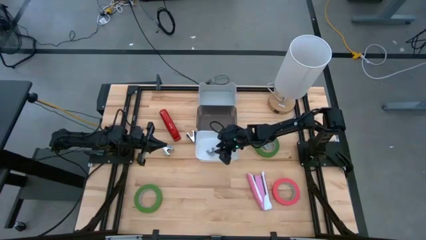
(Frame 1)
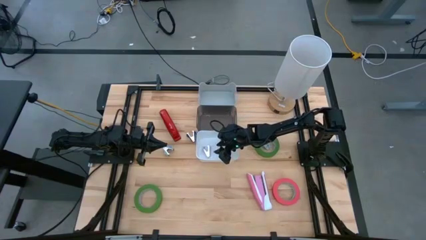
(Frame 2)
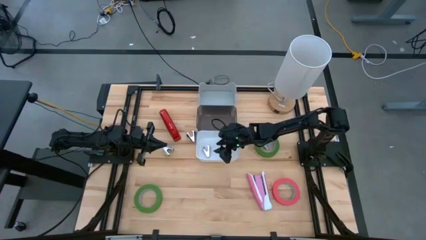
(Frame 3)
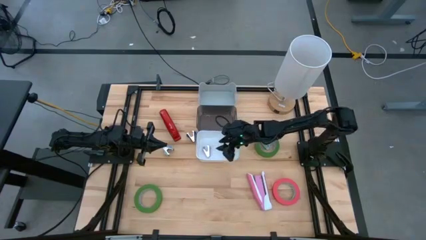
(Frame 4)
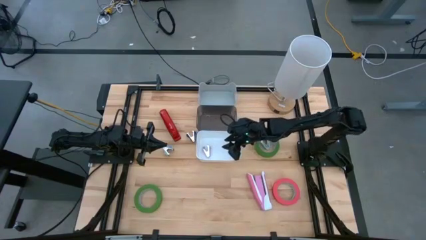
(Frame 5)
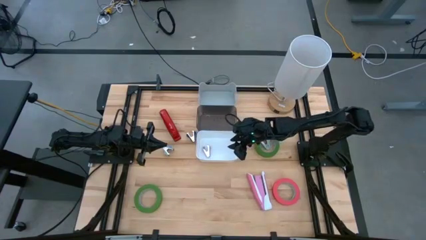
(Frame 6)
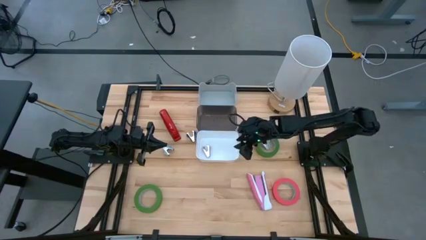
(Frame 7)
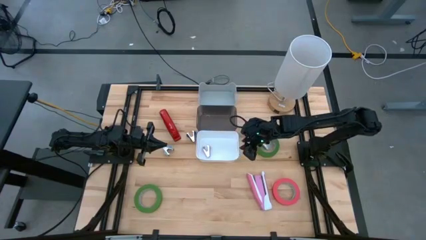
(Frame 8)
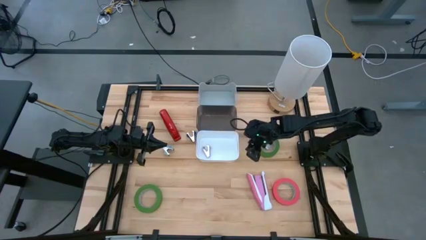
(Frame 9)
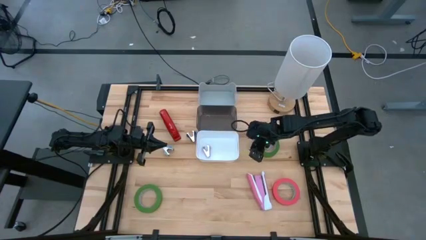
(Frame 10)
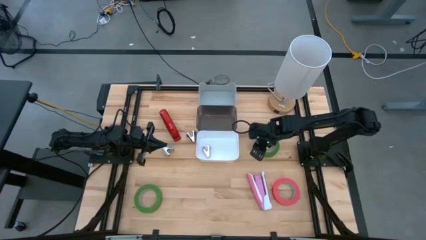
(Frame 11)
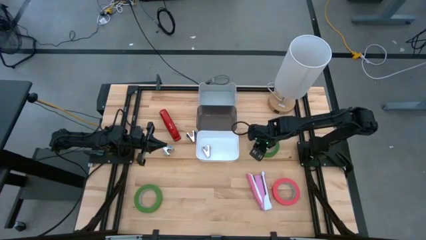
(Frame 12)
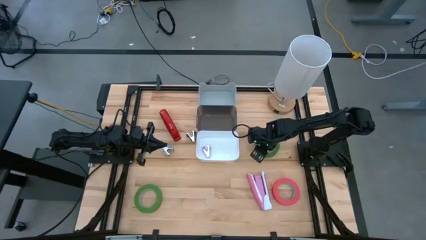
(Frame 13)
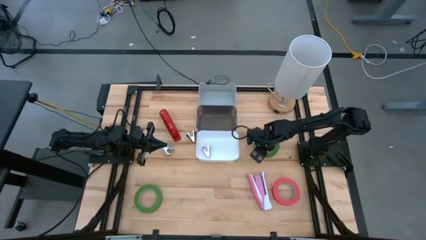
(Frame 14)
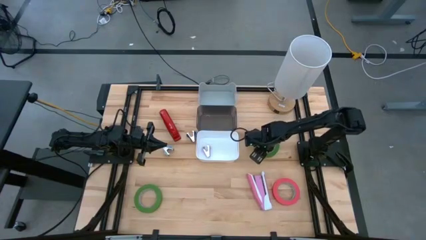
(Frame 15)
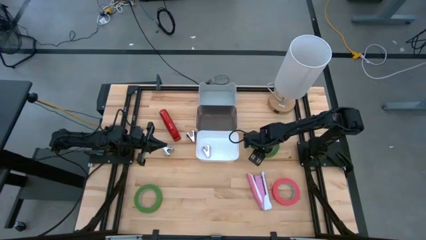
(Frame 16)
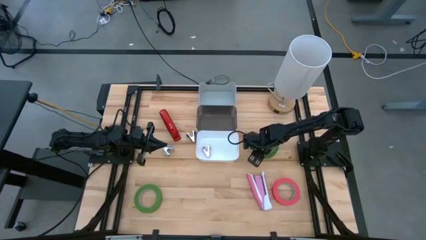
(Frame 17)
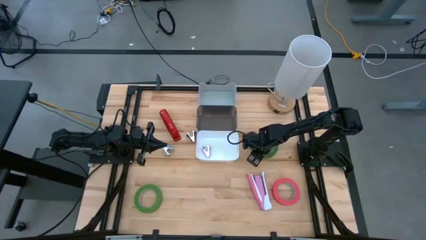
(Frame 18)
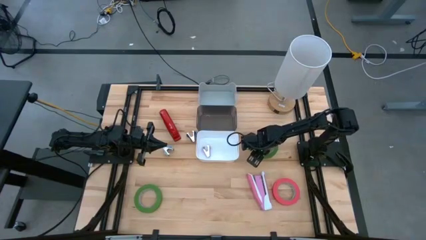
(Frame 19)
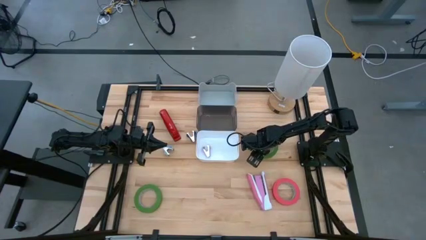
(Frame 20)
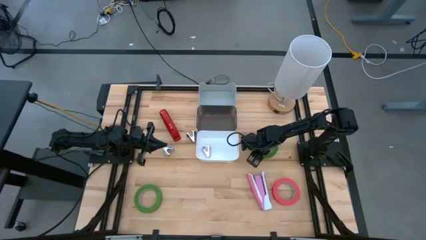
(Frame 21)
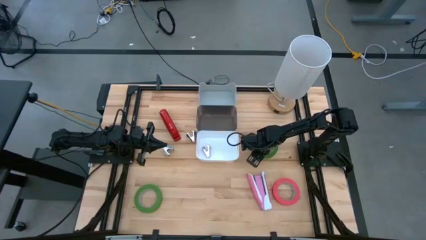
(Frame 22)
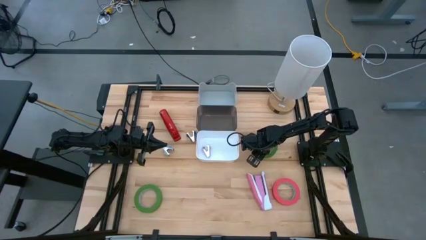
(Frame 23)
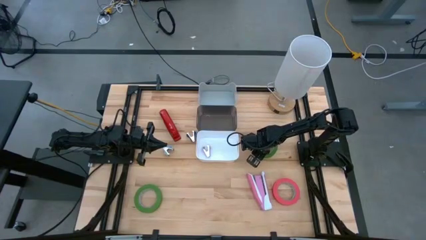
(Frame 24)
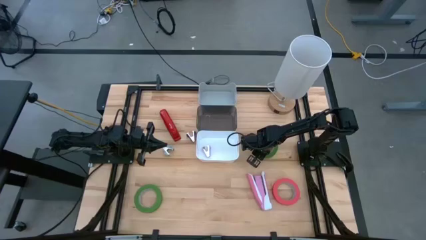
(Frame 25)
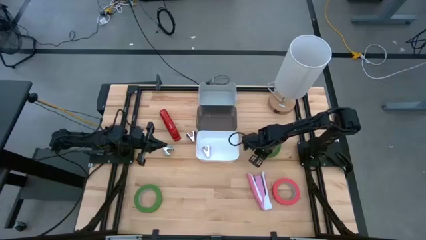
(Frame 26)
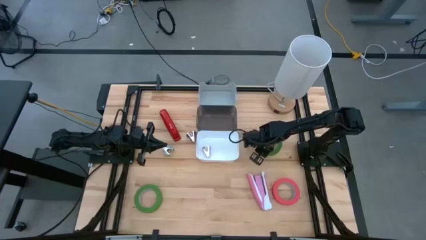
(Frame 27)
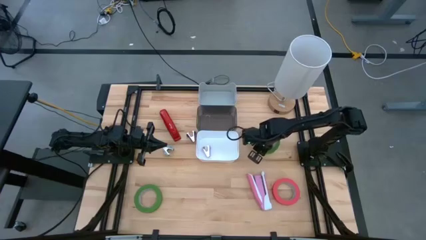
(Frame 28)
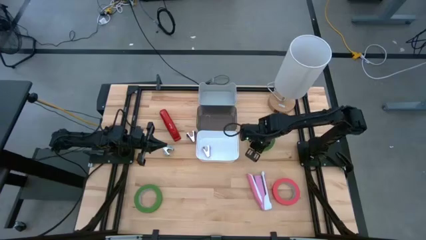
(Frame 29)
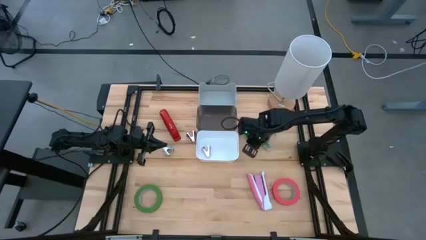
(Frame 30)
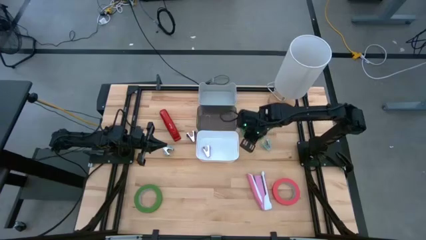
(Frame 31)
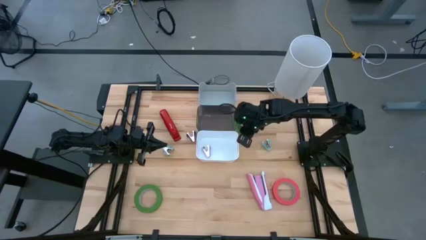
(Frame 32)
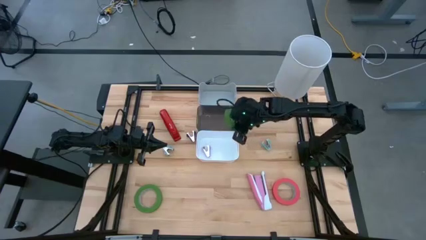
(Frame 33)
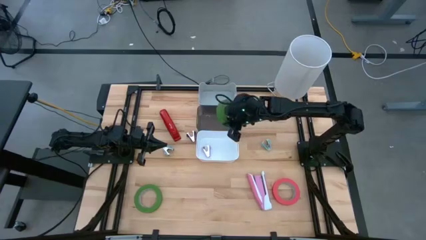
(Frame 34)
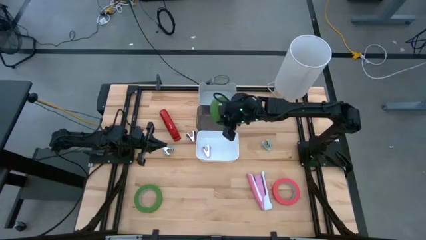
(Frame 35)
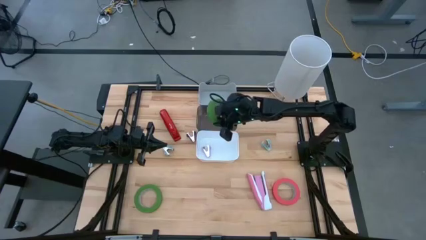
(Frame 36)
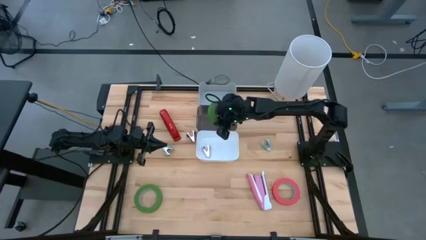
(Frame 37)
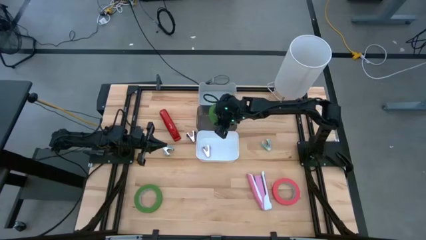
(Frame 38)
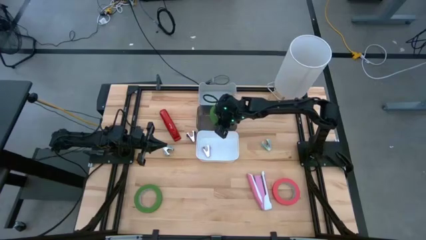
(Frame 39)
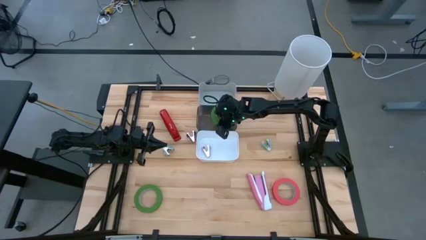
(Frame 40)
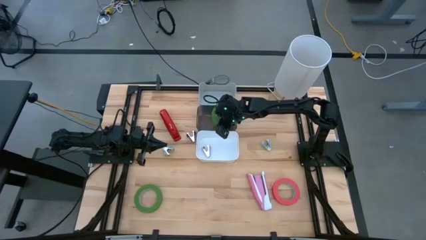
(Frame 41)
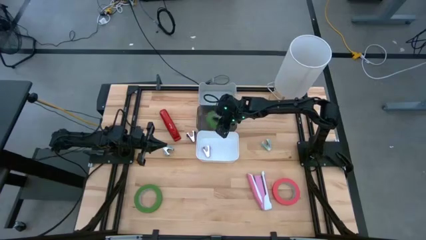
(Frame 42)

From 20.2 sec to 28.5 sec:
Task: Pick and place Stapler, Stapler remover, tape
Put the right green tape in the black bin

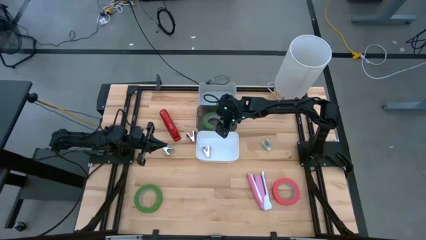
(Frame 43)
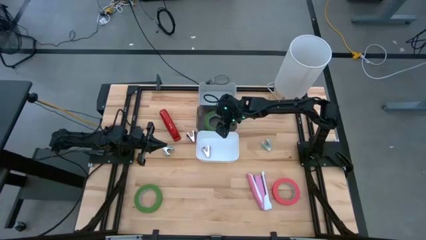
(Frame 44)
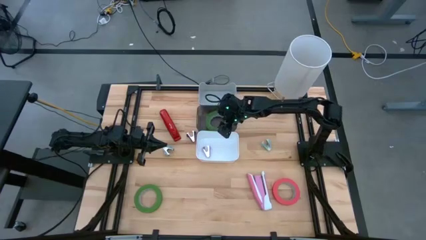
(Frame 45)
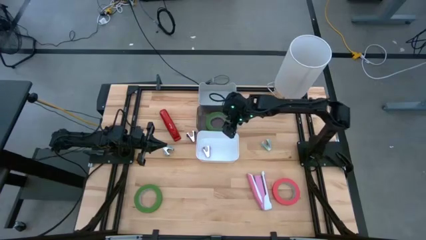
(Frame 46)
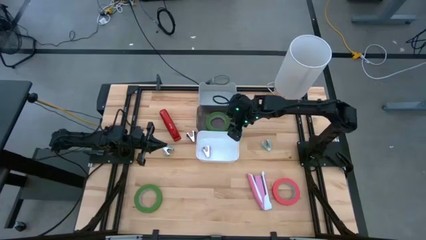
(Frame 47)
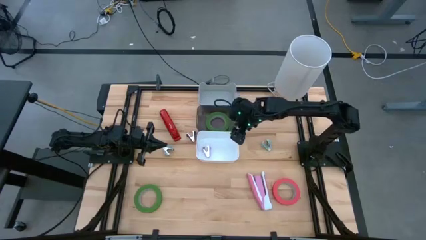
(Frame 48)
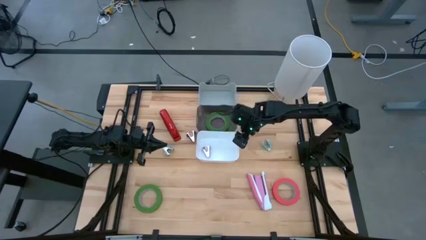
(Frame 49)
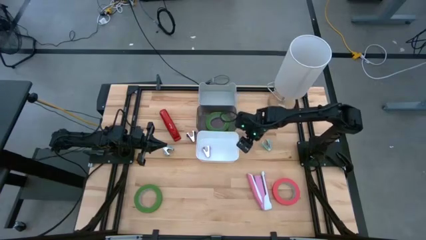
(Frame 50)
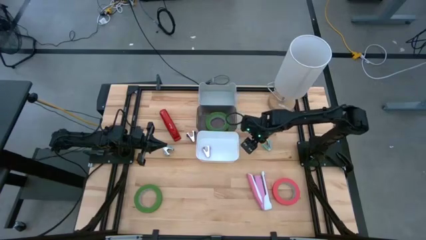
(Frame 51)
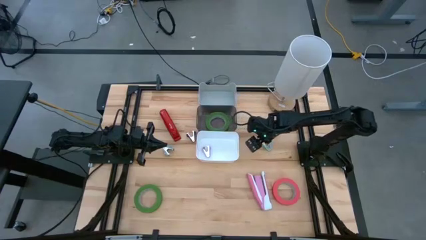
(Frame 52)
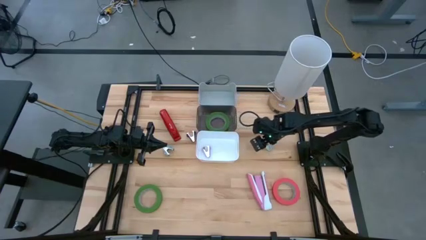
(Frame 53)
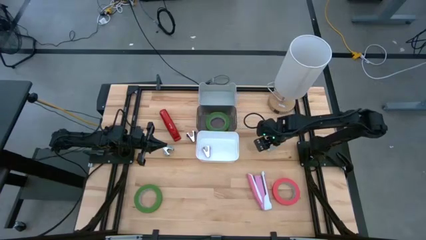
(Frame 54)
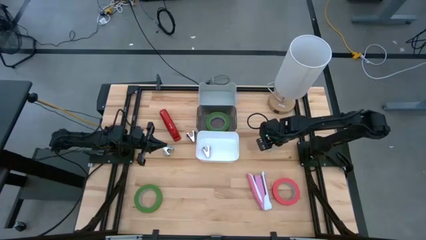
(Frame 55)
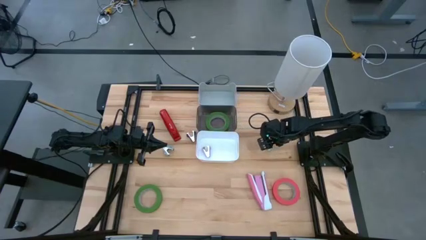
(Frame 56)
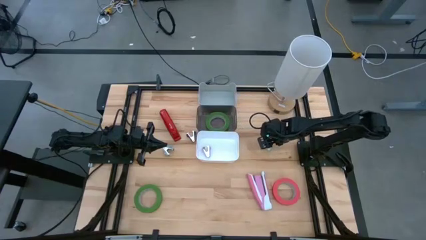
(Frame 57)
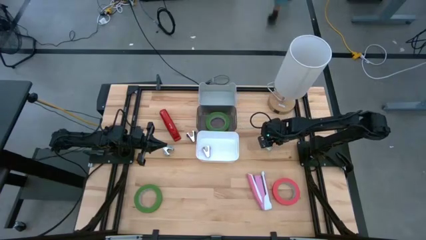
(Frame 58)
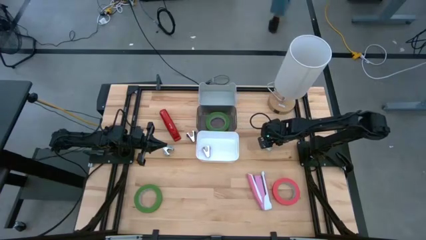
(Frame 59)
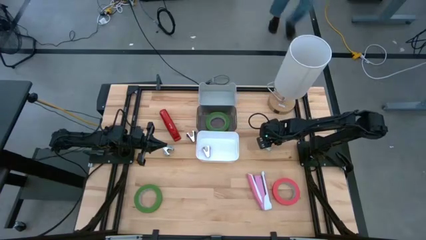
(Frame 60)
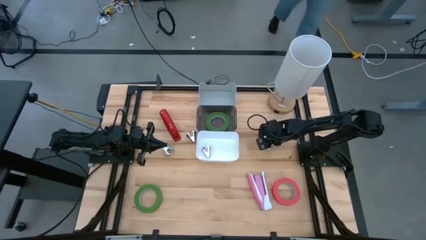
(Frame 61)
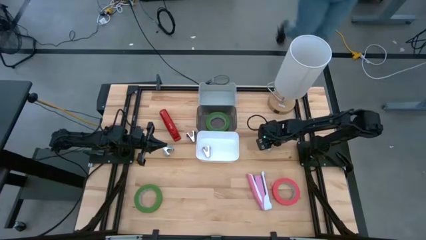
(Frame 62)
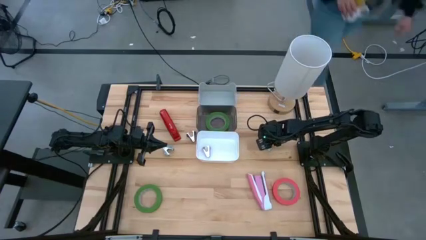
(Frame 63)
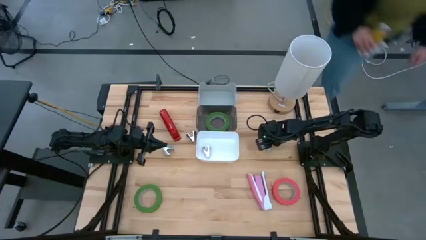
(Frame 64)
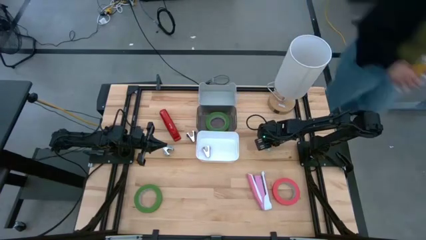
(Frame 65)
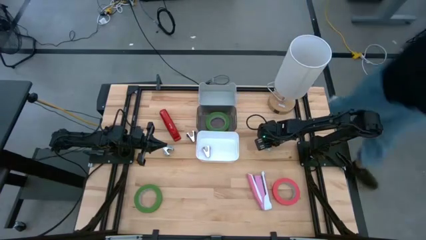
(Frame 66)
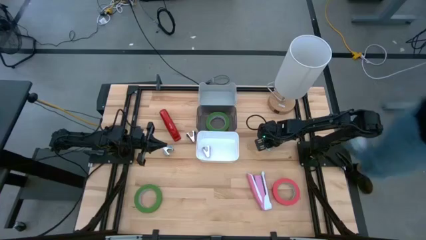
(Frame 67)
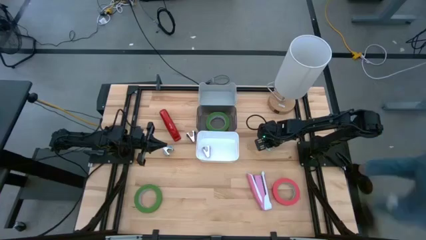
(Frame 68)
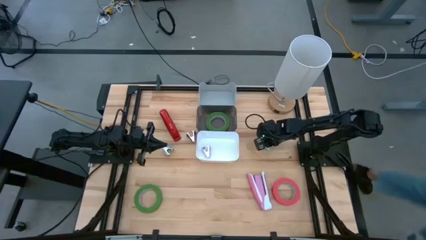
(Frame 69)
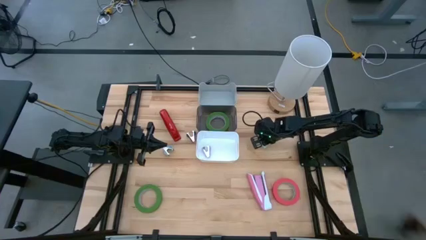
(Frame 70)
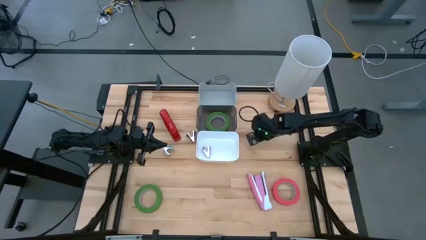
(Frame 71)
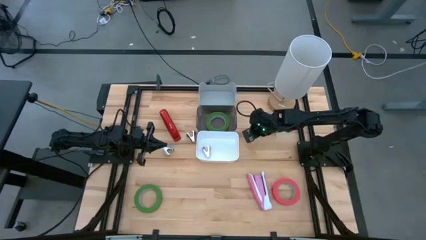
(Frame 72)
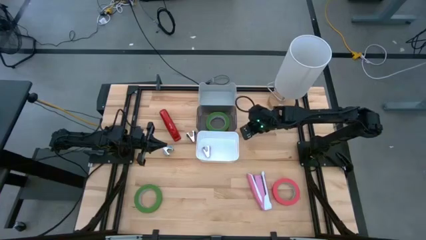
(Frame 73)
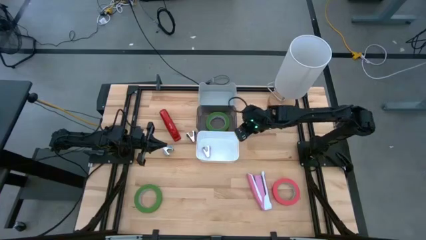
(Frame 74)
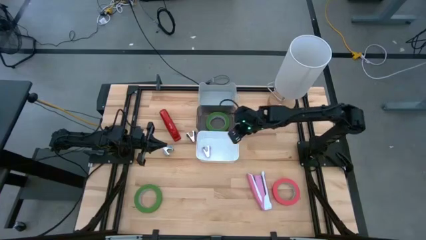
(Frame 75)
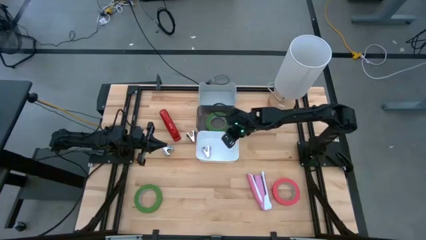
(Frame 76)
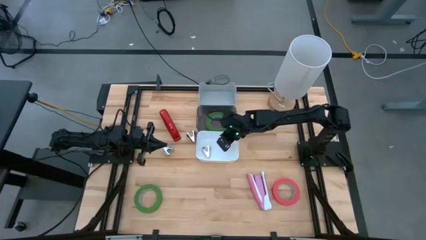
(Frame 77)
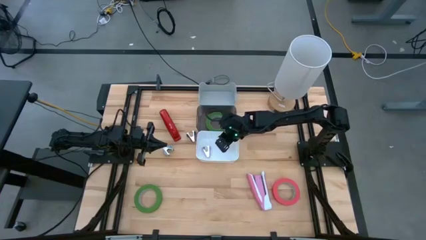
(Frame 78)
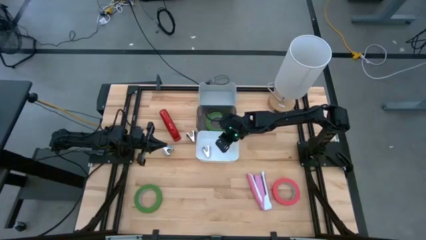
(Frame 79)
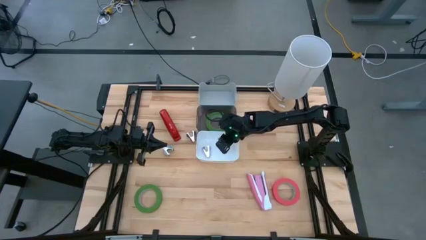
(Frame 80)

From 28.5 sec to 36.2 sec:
Put the light blue staple remover in the white bin
